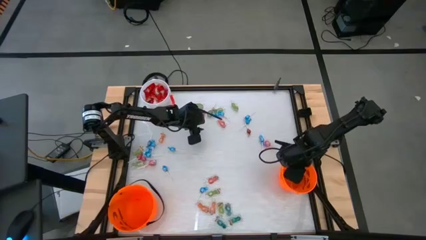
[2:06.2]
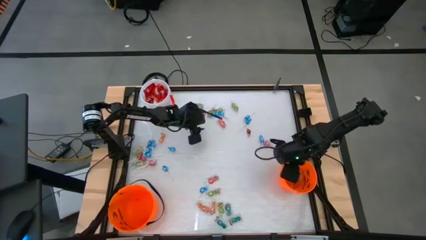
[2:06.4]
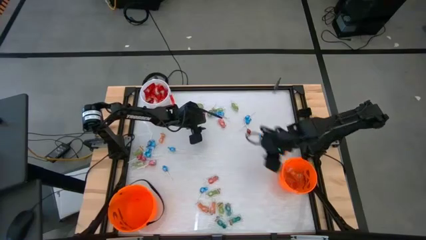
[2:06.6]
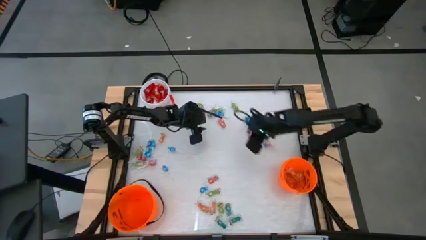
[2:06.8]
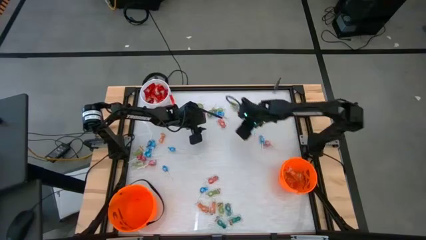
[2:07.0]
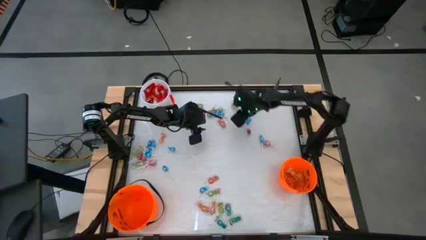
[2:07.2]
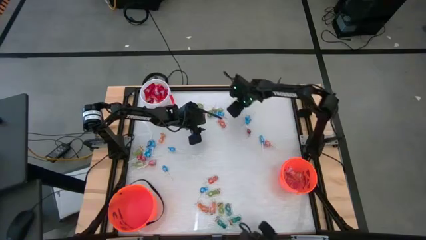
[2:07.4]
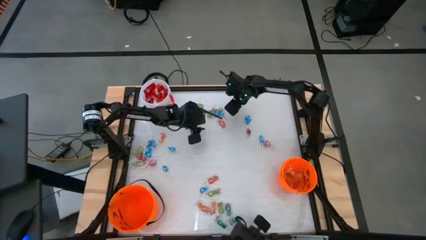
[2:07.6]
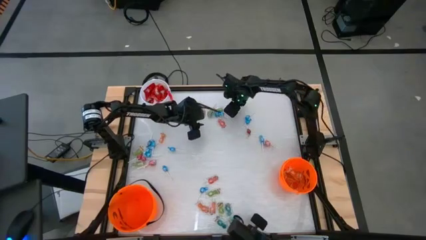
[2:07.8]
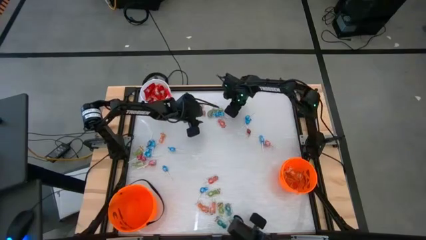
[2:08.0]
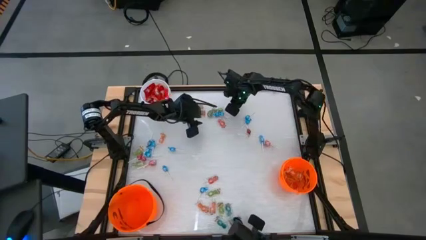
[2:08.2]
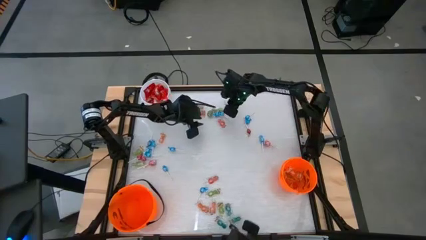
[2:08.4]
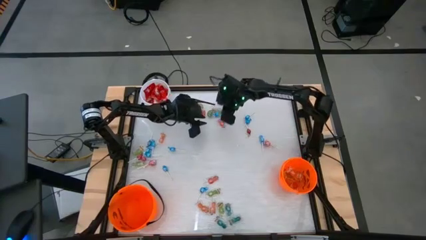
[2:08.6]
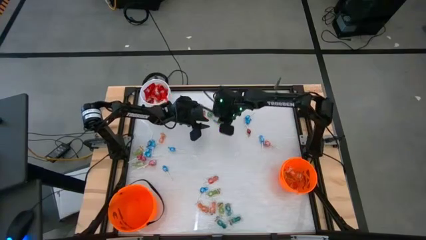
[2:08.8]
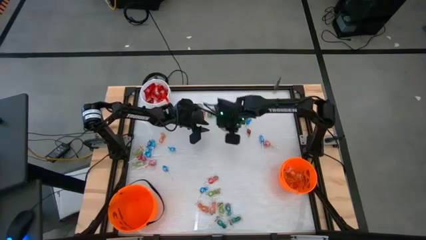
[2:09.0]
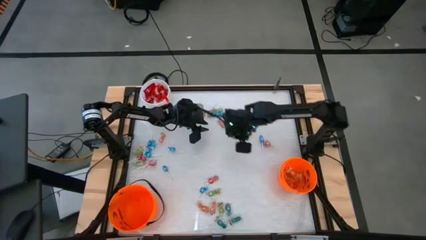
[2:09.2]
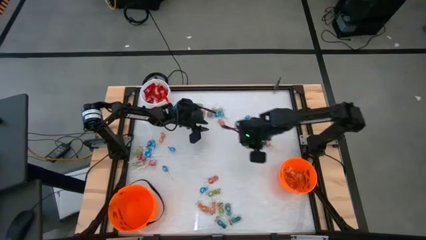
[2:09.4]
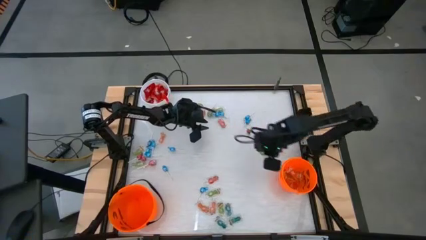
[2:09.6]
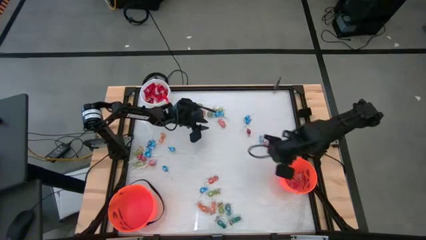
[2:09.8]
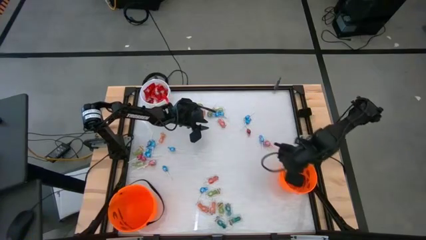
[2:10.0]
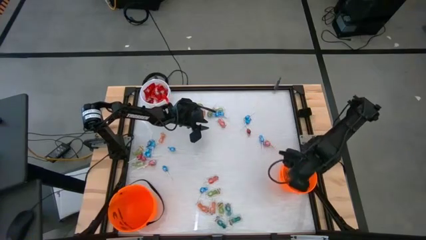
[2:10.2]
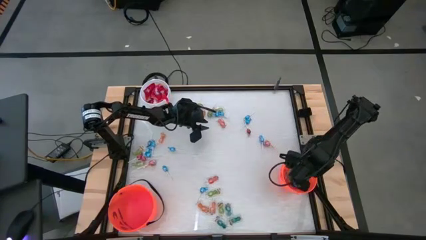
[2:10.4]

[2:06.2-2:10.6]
Task: Sort candy by brand, put in halloween buckets
Put the green candy into the right orange bucket

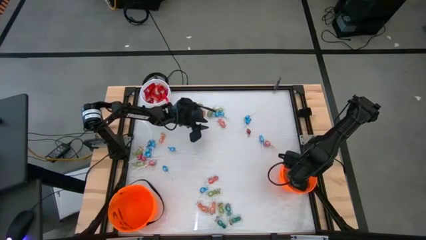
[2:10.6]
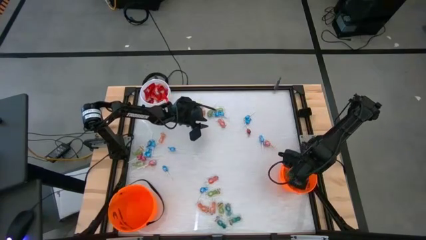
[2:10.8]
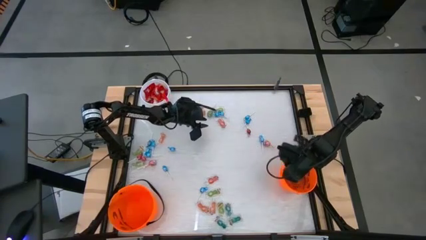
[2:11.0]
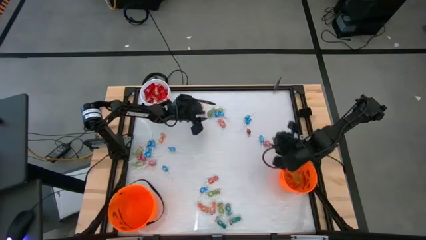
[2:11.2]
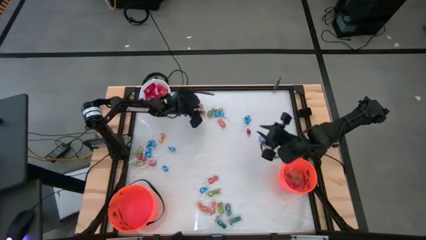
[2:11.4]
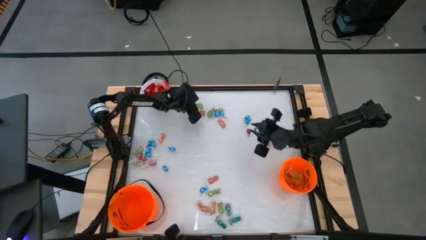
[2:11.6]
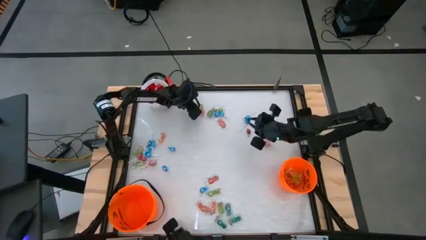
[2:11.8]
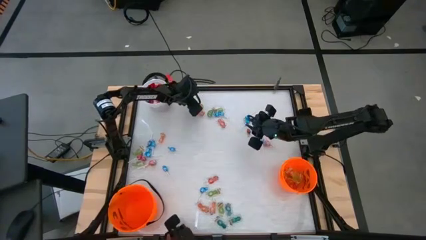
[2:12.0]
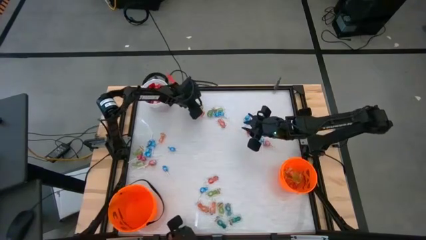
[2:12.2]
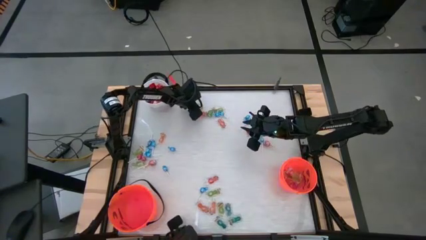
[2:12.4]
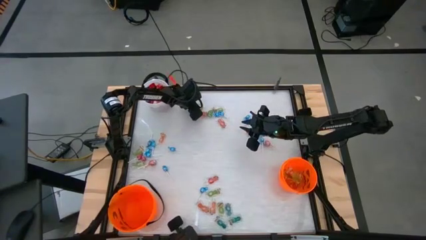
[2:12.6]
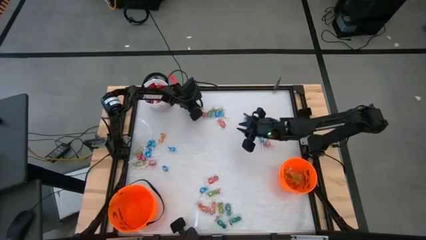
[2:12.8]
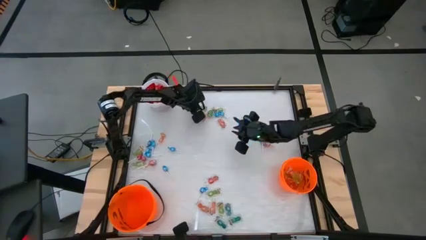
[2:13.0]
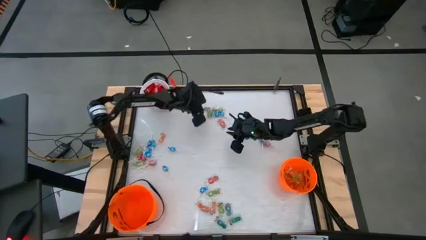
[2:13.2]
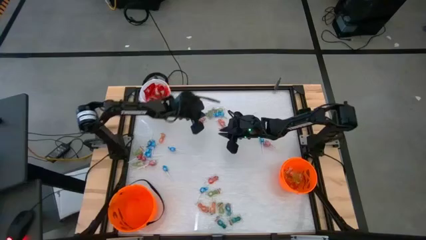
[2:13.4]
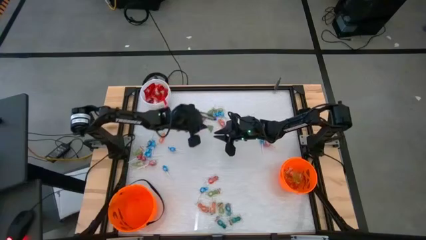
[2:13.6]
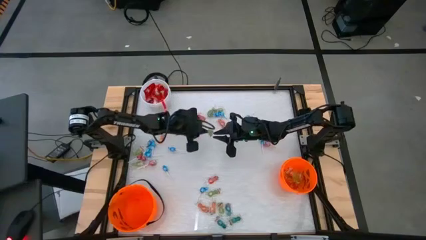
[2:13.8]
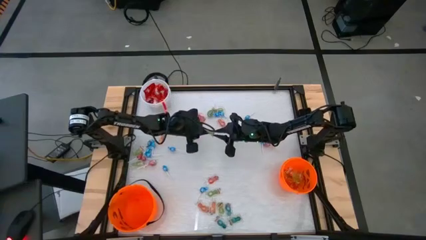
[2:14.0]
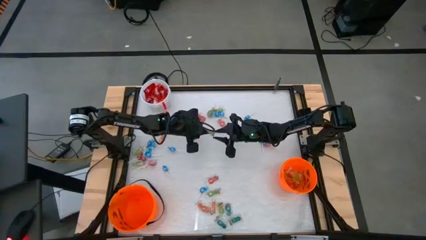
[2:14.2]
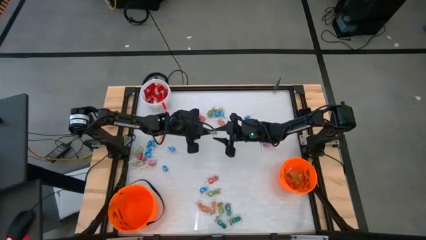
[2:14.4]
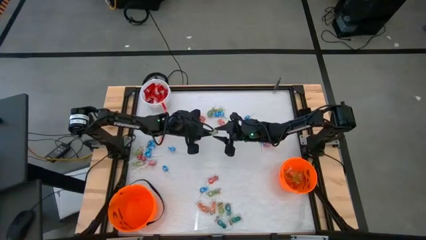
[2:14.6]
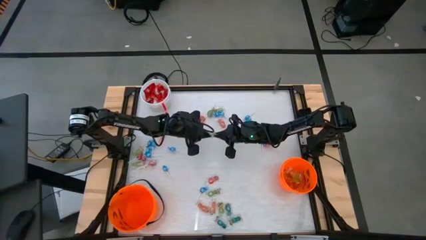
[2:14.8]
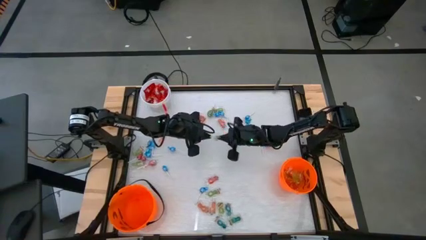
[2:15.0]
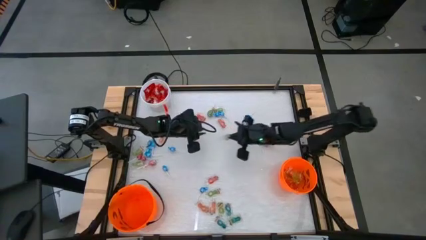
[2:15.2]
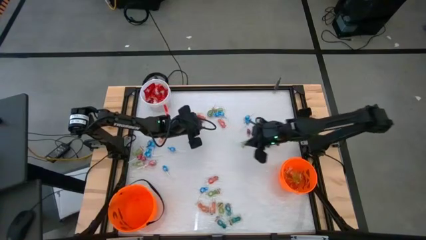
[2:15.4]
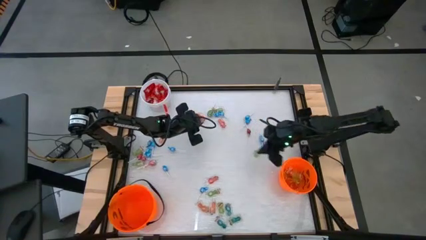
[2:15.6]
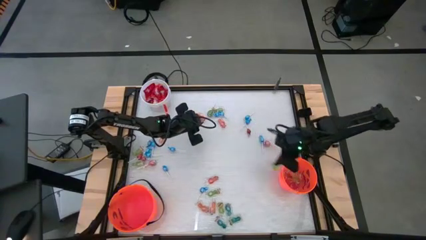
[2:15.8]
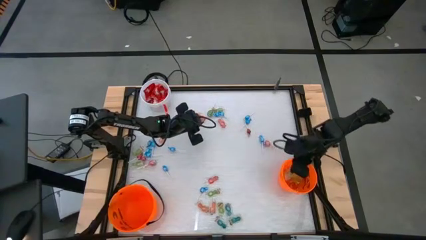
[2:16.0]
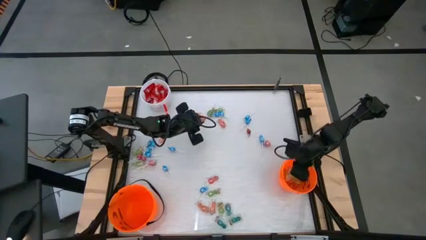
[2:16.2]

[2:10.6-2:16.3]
Put the green candy into the right orange bucket

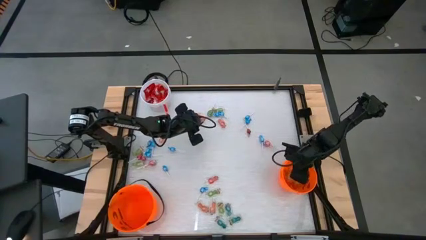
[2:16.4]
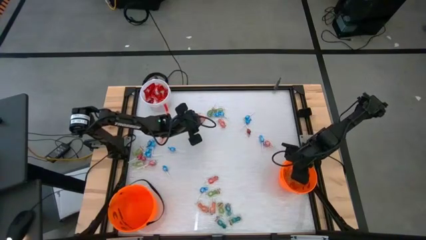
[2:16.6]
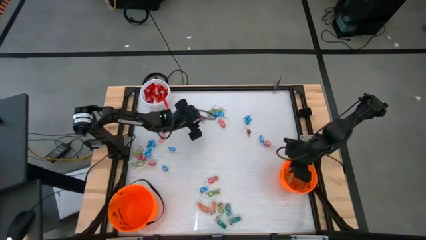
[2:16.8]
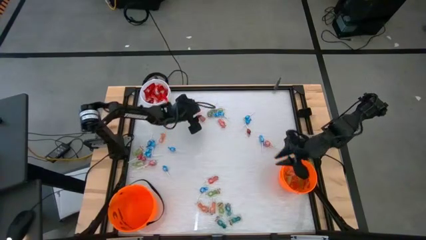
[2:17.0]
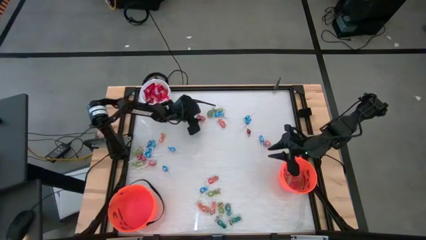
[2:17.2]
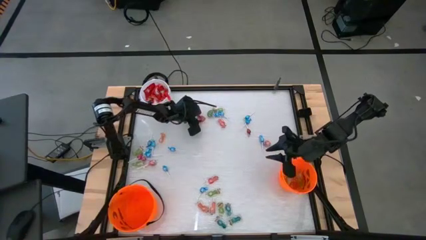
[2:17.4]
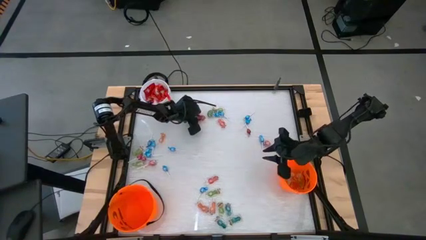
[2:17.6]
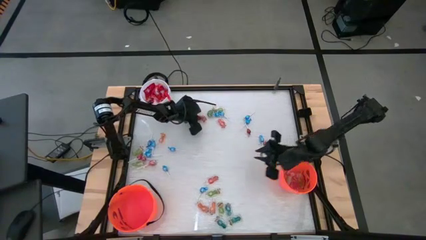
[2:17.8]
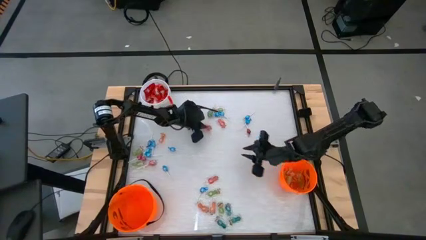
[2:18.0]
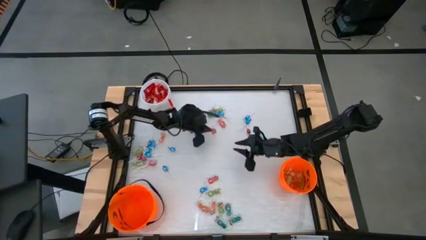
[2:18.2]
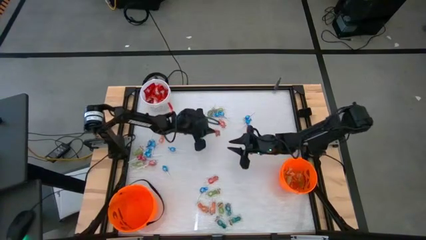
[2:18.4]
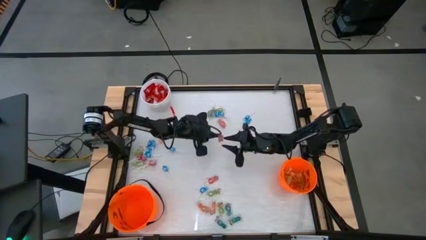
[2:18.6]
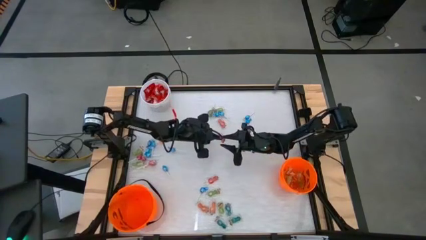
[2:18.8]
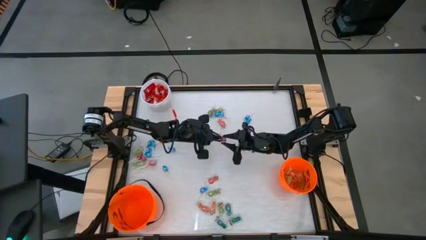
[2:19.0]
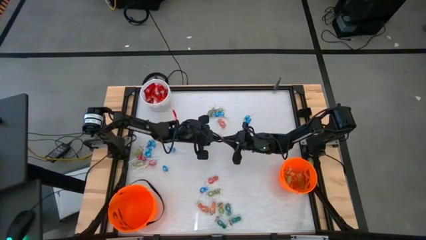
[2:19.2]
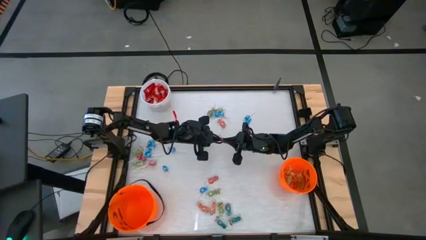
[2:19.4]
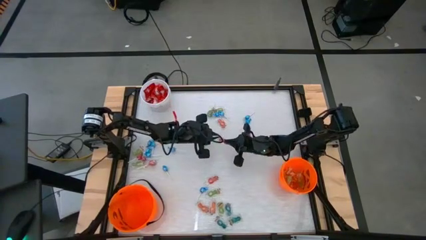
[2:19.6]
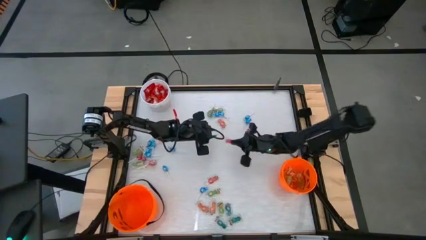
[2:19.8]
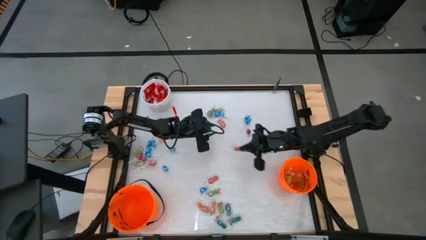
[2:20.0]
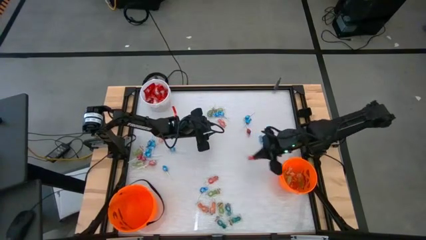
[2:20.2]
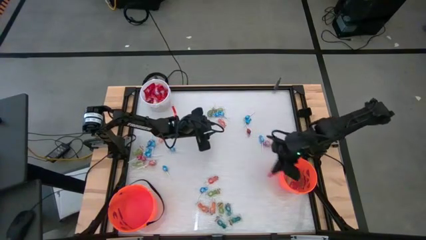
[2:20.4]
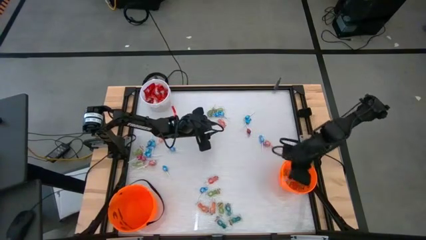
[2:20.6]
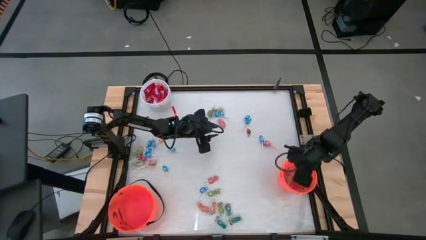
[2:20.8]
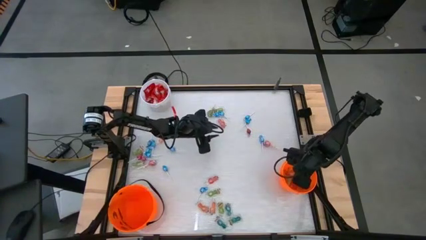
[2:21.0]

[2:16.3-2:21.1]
Put the orange candy into the right orange bucket

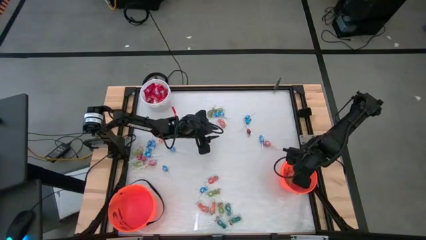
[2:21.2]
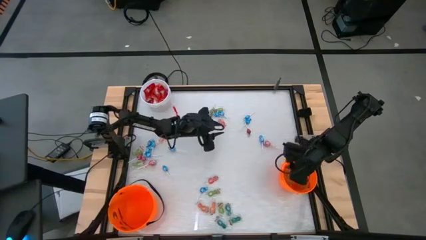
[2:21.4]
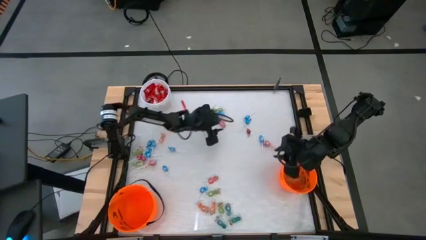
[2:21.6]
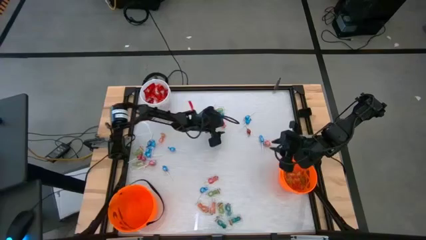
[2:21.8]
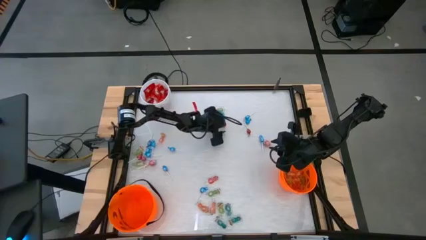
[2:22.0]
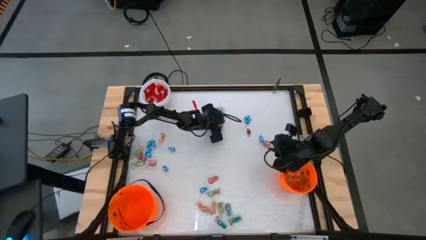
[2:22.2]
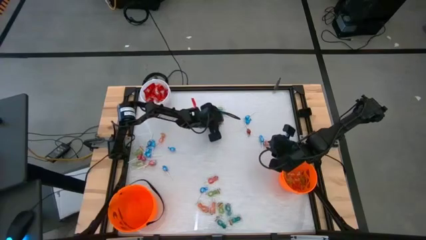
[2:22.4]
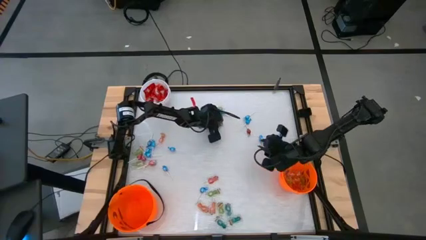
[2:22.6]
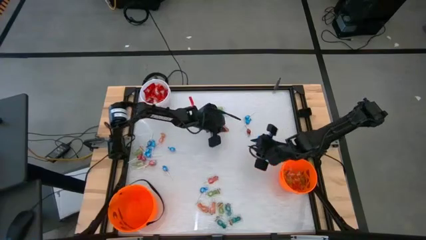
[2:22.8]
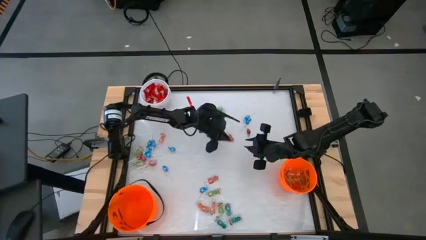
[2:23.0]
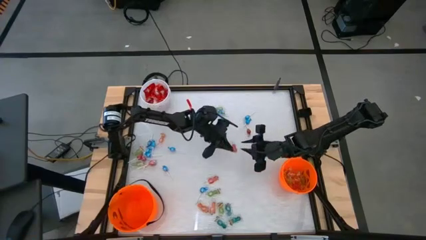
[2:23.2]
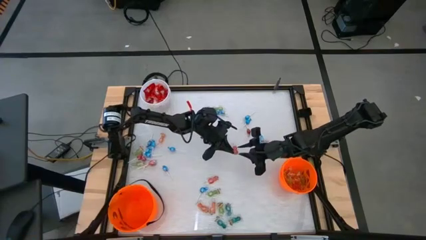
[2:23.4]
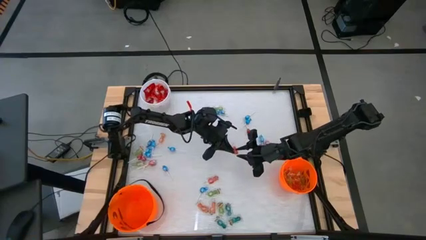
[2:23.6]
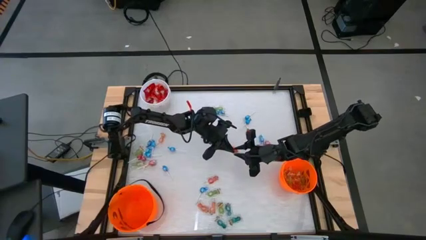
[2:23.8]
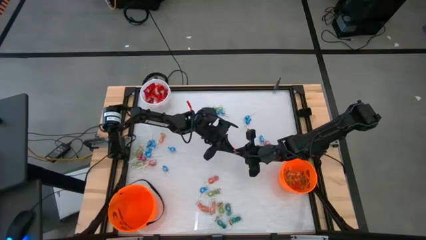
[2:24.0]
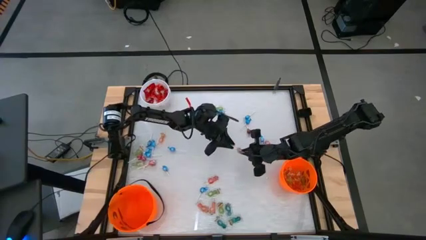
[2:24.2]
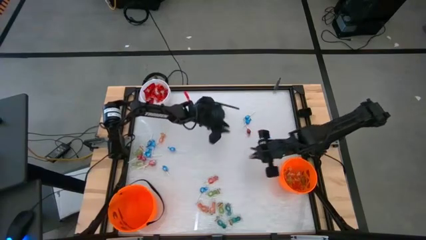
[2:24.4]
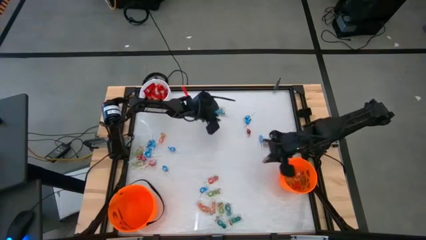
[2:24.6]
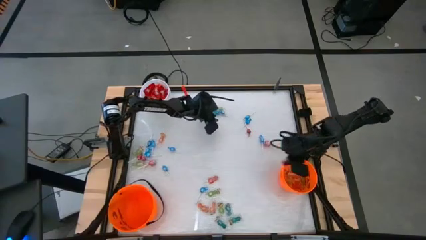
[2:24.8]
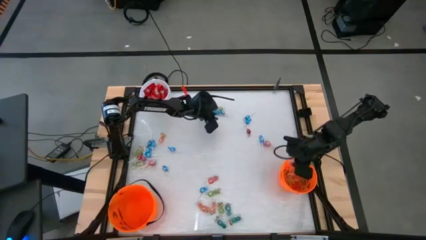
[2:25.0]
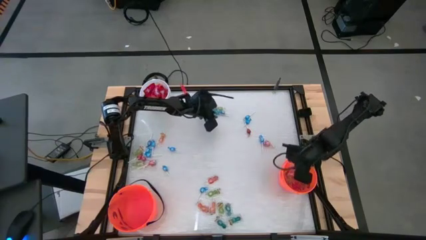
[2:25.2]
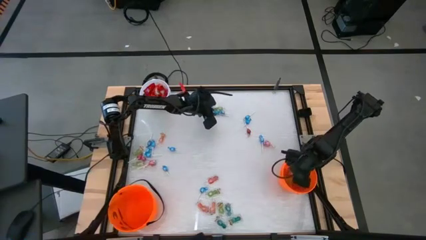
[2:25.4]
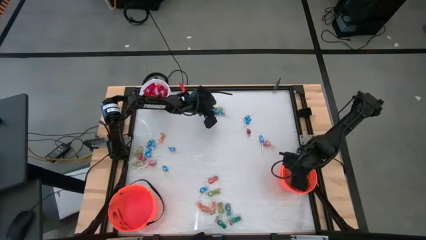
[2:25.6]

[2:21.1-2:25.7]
Put the orange candy into the right orange bucket
